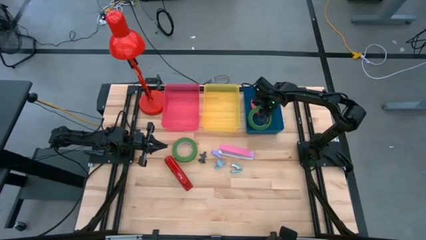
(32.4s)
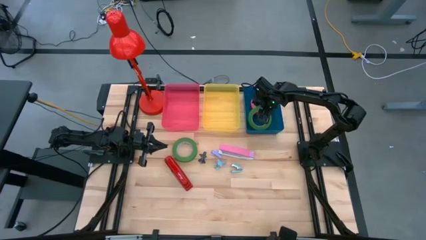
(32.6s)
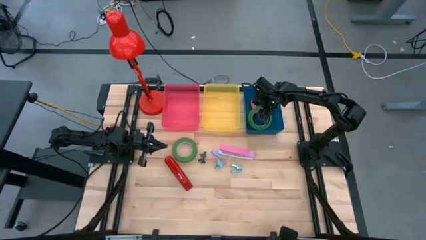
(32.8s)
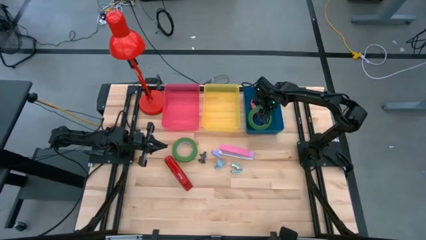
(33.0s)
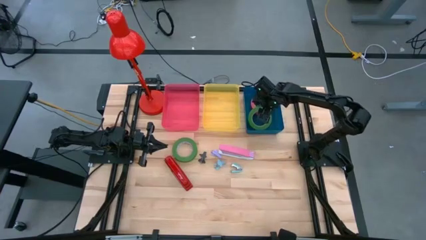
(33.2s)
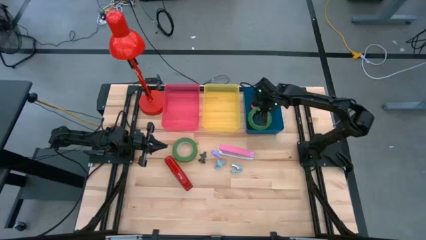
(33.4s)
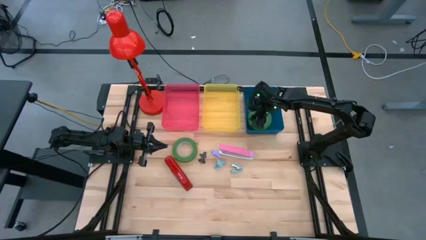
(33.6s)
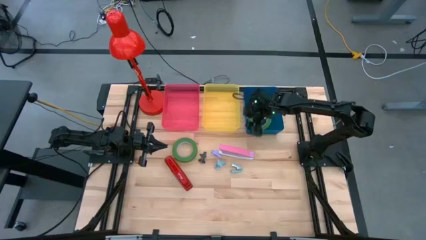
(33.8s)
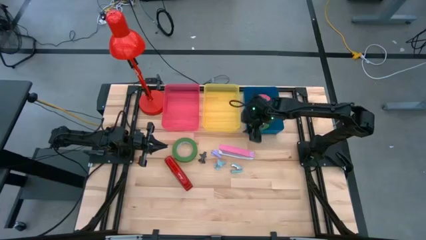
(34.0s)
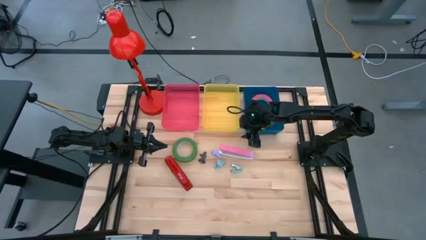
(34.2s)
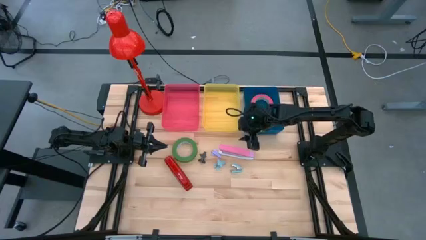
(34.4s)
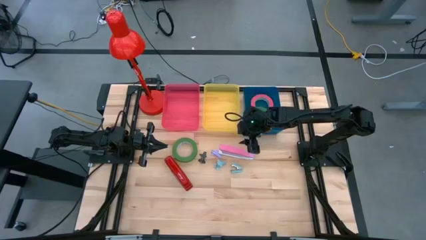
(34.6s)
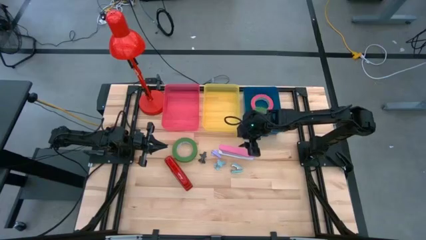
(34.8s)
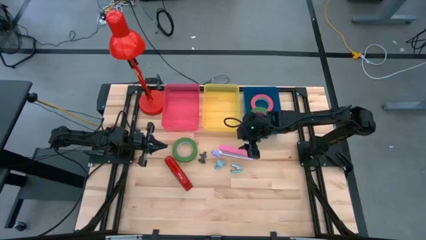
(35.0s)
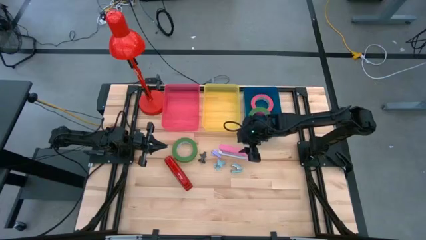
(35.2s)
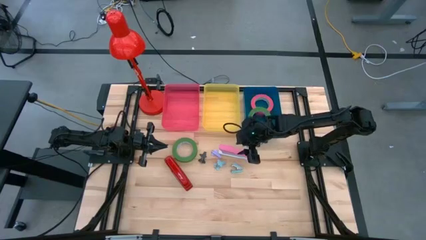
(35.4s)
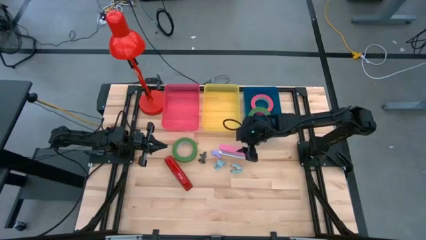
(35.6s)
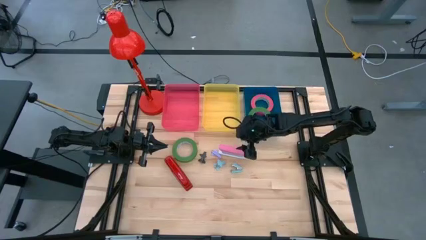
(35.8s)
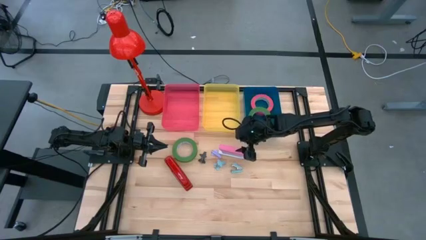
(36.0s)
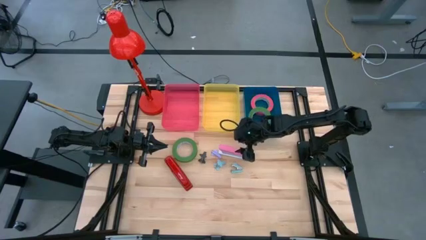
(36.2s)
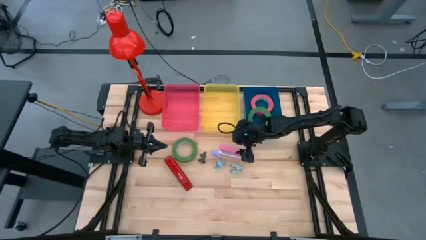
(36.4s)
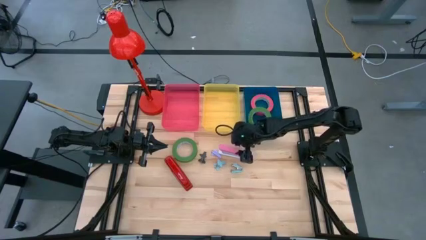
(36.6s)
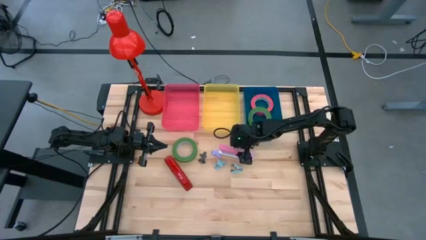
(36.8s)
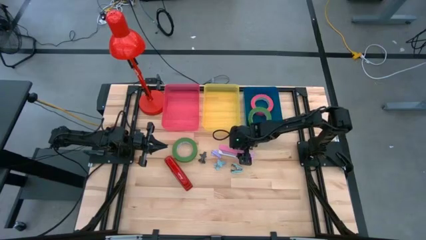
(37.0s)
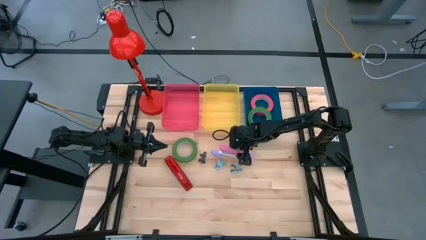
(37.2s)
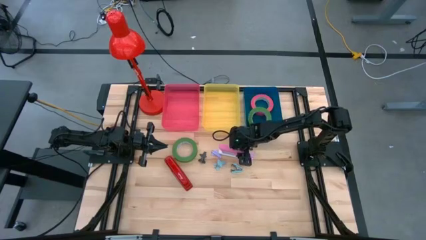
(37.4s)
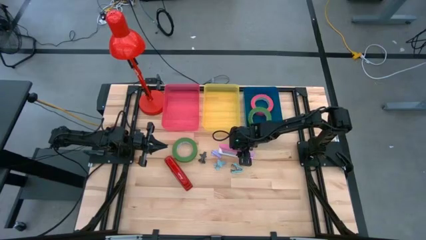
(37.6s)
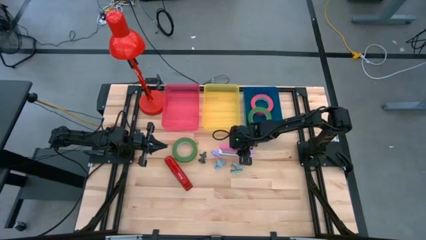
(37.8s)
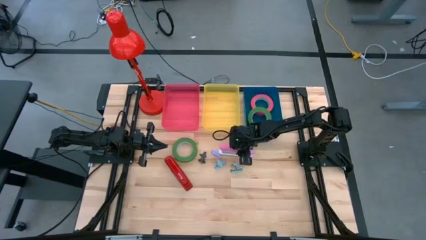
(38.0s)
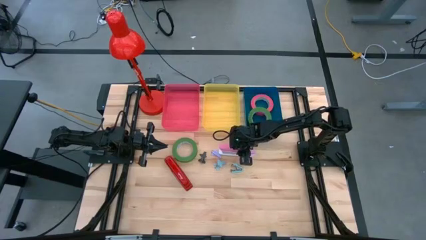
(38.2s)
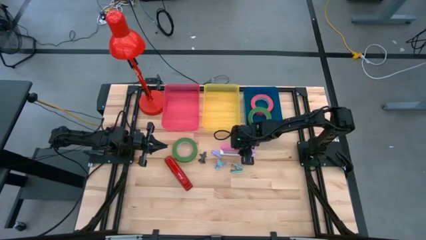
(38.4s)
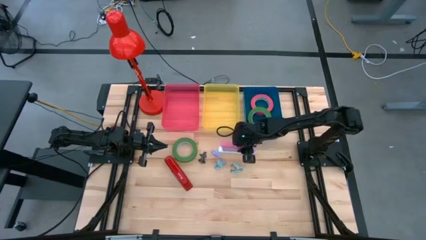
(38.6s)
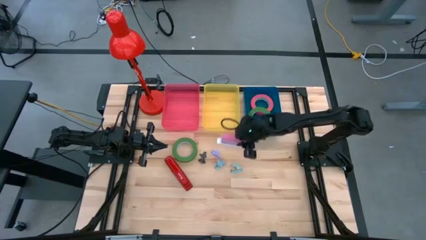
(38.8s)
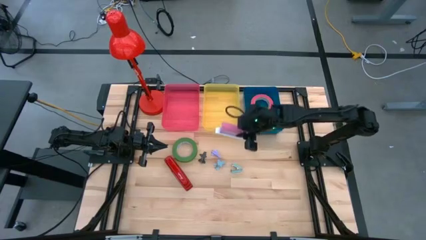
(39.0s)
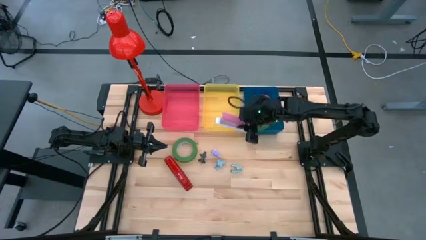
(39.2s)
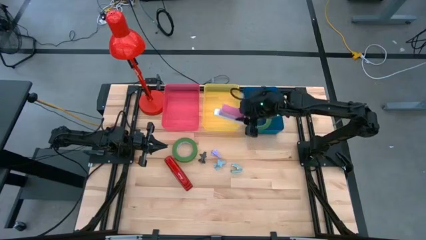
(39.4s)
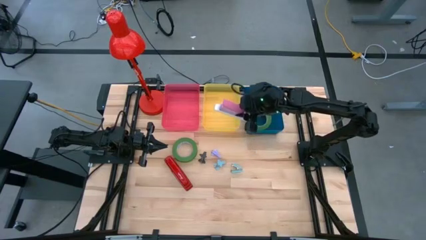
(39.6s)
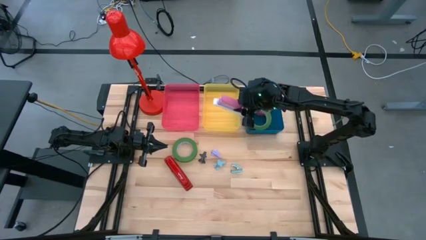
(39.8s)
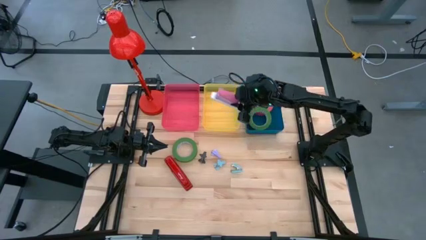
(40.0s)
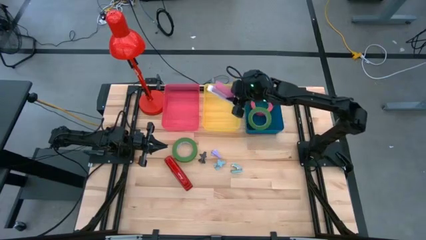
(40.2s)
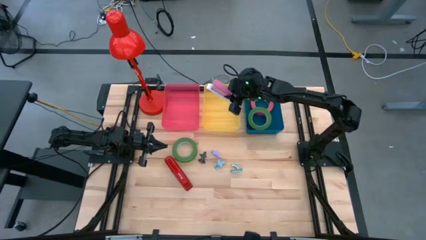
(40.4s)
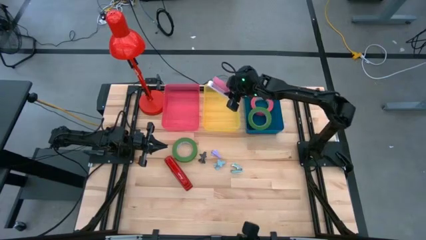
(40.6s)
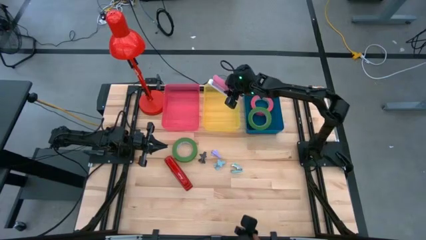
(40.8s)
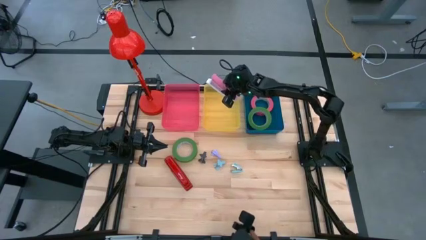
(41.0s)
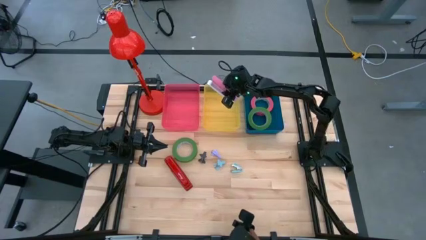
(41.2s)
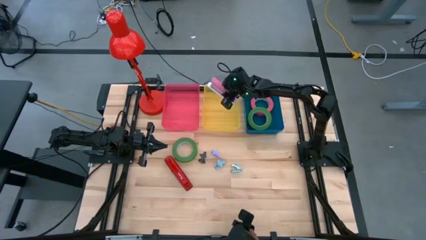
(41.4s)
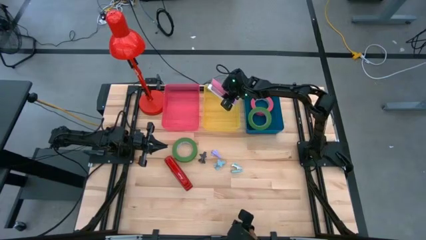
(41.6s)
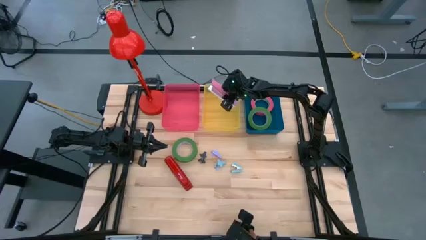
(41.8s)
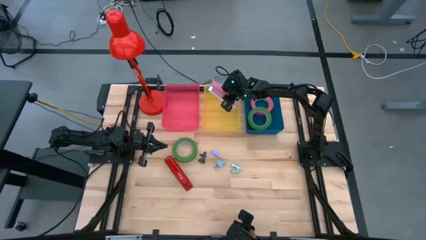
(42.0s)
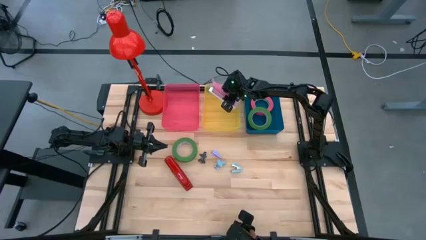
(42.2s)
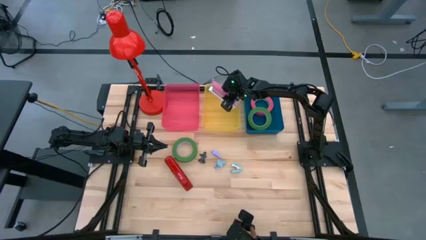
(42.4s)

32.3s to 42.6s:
Task: Pick and place Stapler, Stapler remover, tape
Put the pink stapler into the yellow bin
